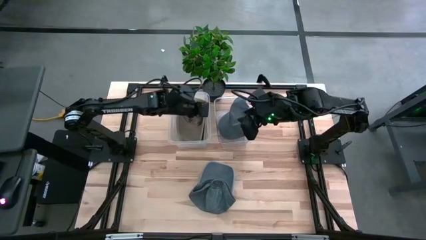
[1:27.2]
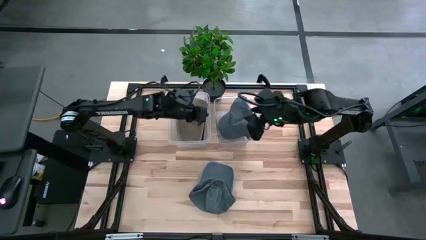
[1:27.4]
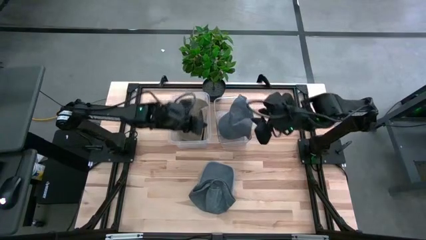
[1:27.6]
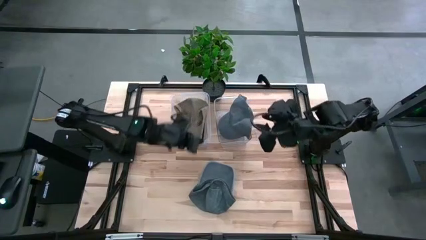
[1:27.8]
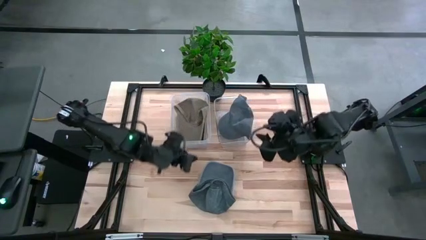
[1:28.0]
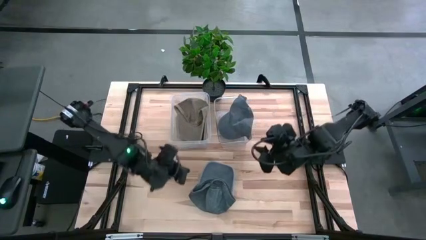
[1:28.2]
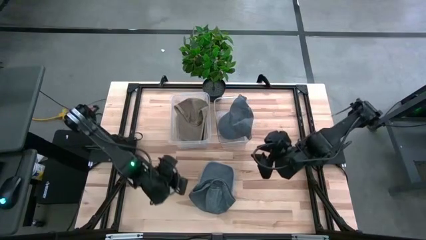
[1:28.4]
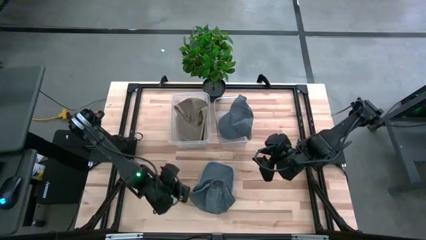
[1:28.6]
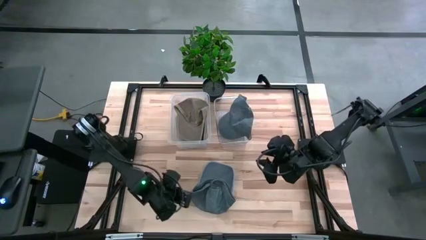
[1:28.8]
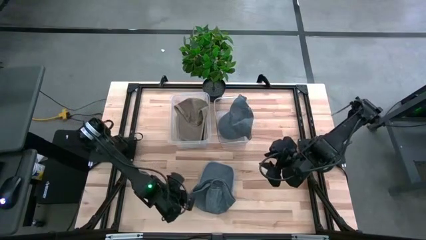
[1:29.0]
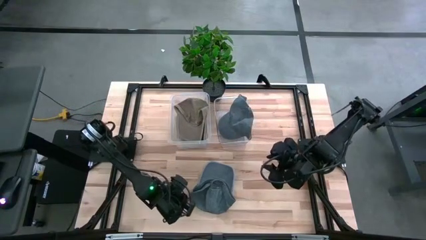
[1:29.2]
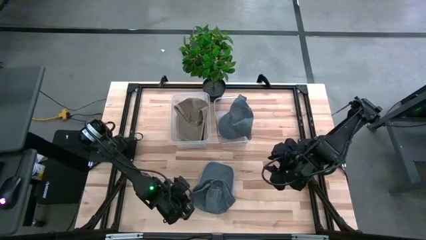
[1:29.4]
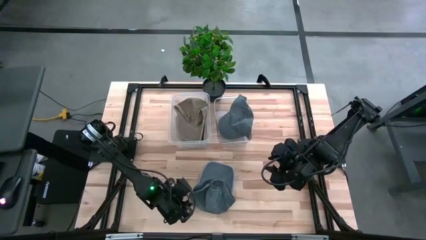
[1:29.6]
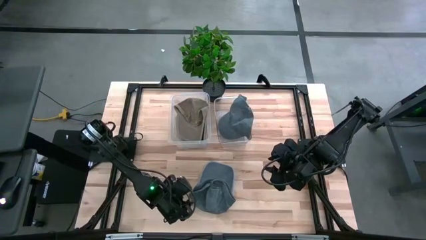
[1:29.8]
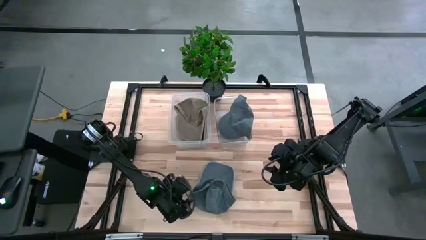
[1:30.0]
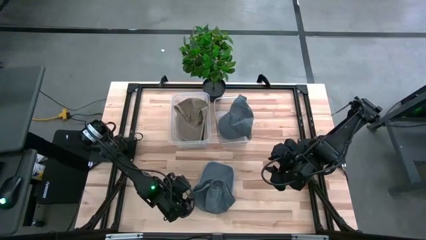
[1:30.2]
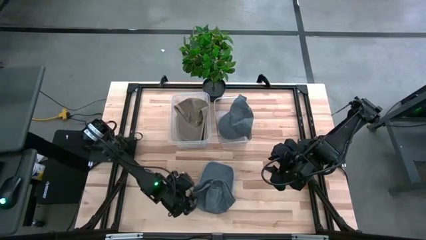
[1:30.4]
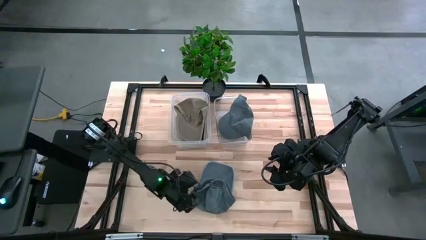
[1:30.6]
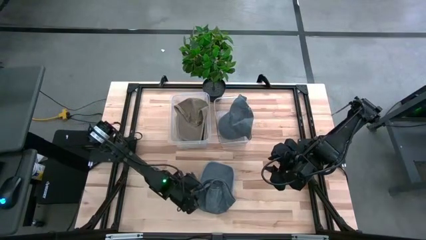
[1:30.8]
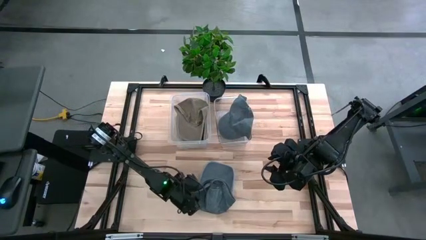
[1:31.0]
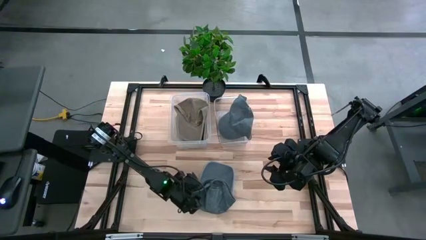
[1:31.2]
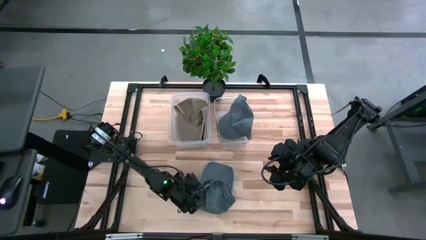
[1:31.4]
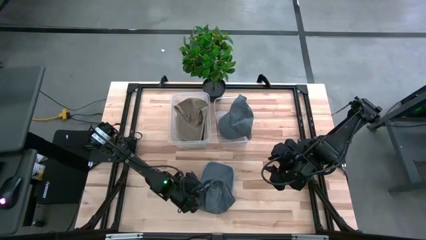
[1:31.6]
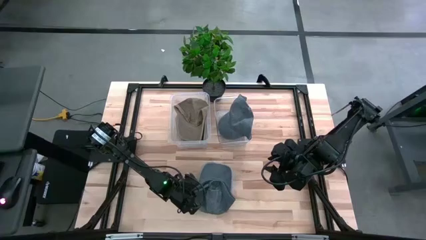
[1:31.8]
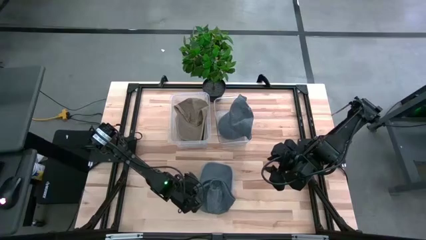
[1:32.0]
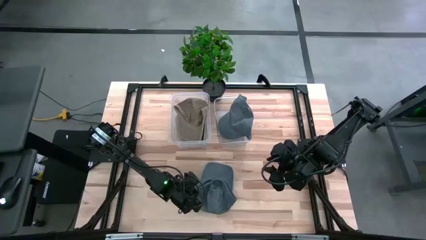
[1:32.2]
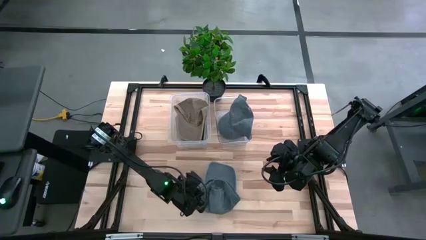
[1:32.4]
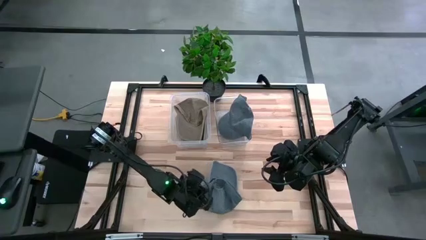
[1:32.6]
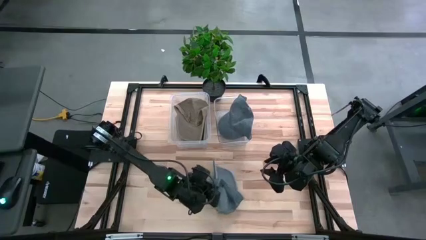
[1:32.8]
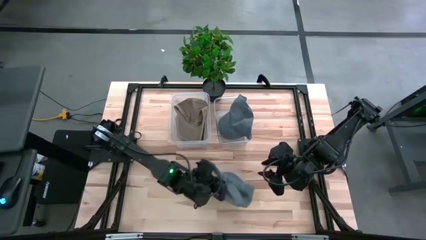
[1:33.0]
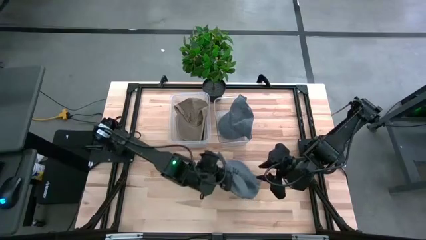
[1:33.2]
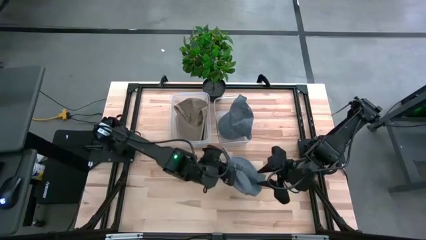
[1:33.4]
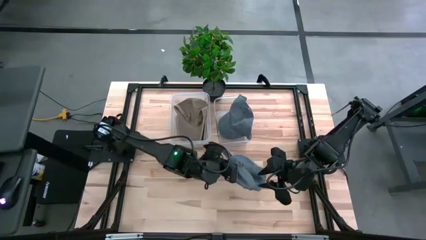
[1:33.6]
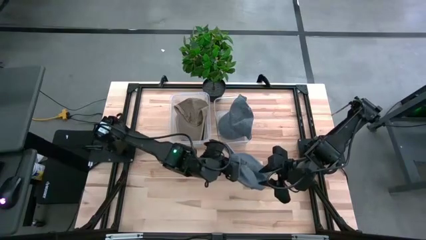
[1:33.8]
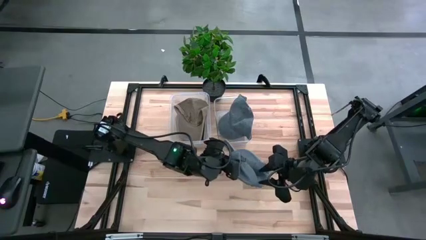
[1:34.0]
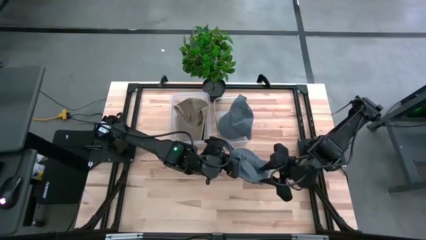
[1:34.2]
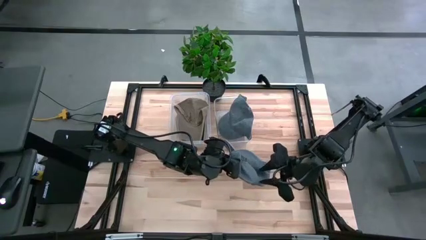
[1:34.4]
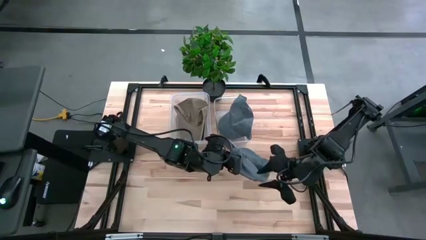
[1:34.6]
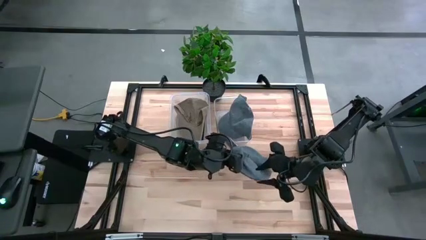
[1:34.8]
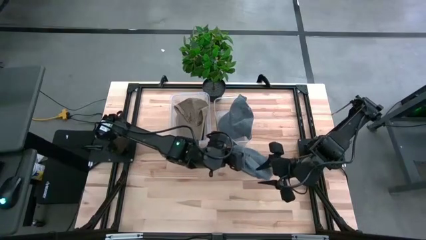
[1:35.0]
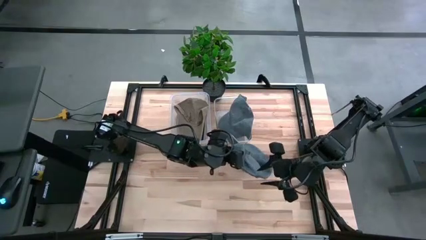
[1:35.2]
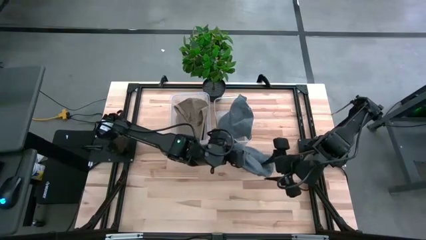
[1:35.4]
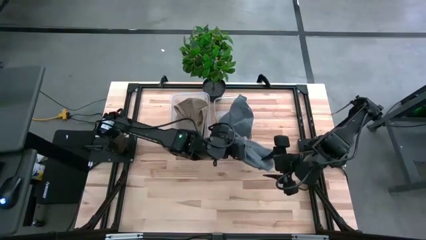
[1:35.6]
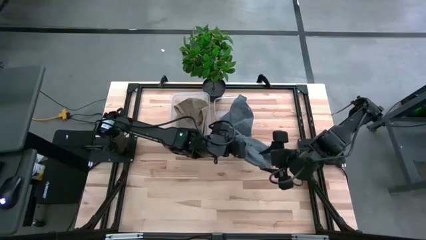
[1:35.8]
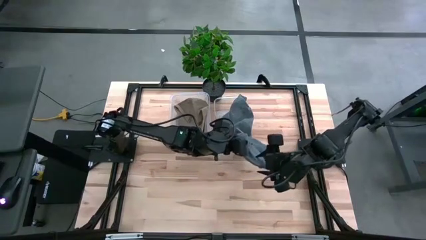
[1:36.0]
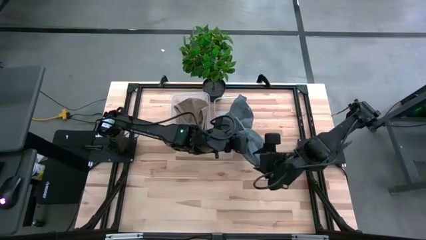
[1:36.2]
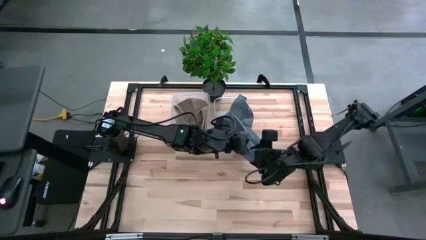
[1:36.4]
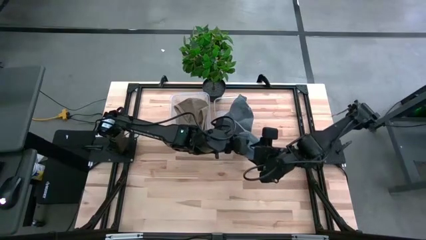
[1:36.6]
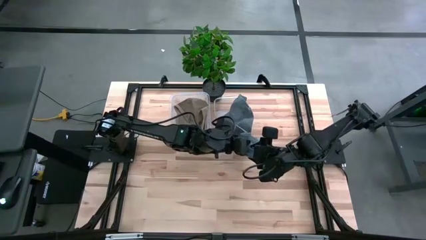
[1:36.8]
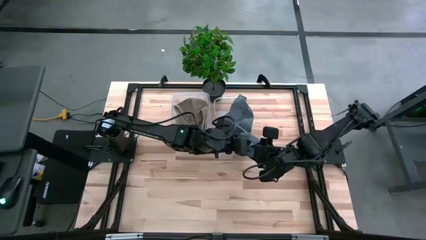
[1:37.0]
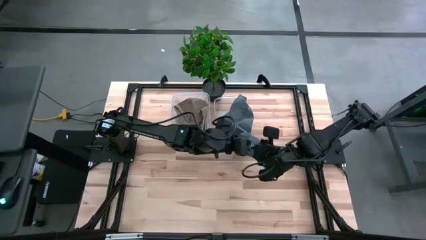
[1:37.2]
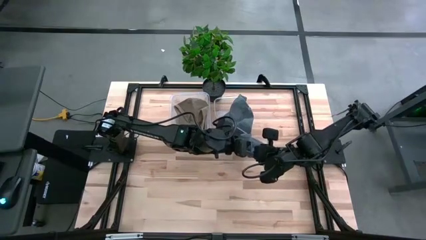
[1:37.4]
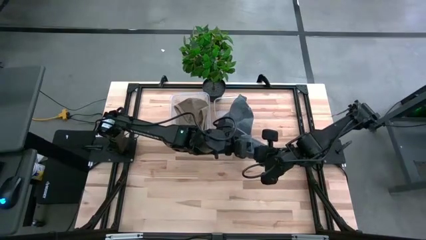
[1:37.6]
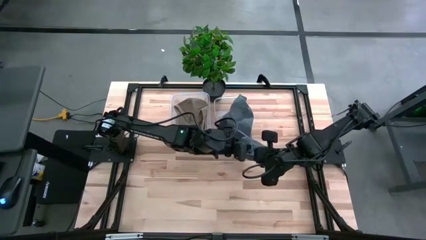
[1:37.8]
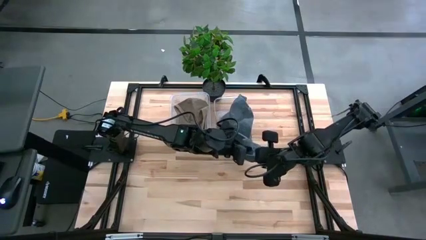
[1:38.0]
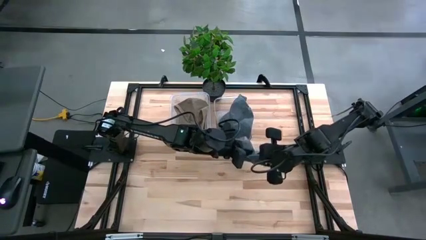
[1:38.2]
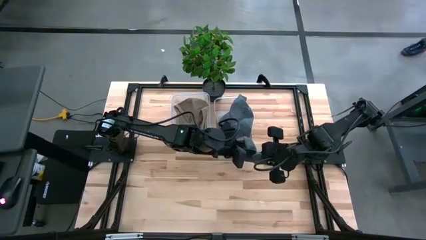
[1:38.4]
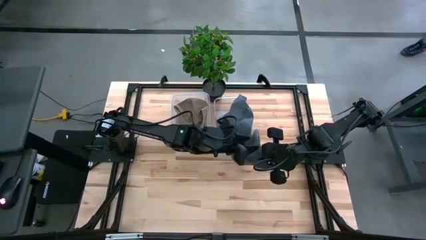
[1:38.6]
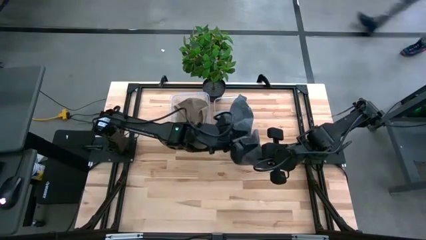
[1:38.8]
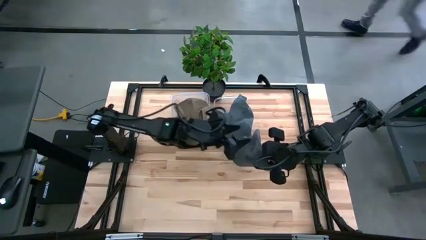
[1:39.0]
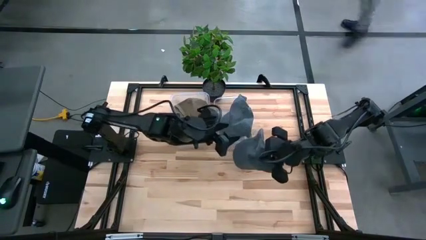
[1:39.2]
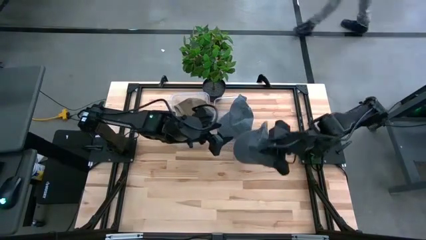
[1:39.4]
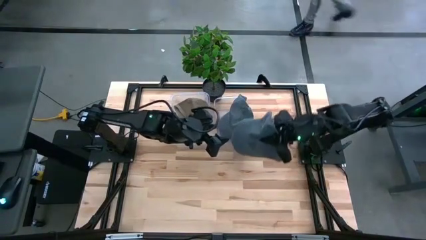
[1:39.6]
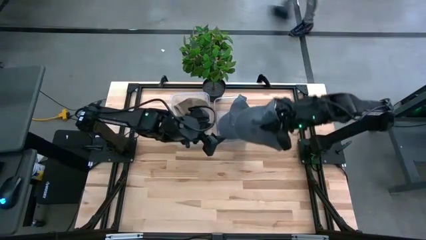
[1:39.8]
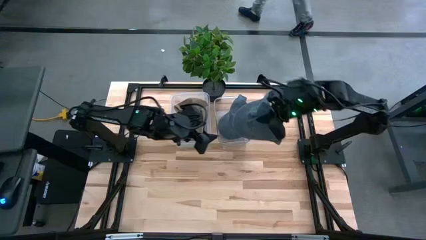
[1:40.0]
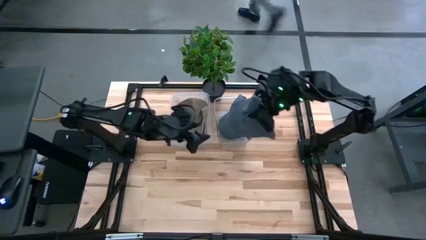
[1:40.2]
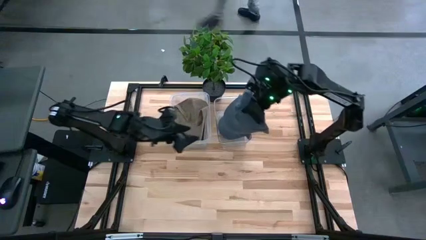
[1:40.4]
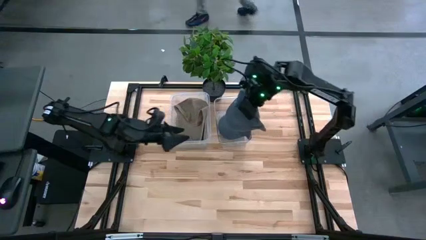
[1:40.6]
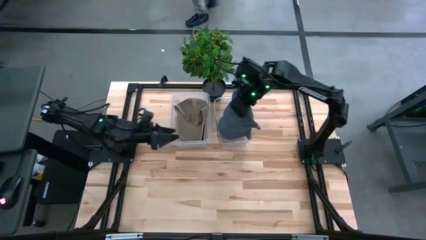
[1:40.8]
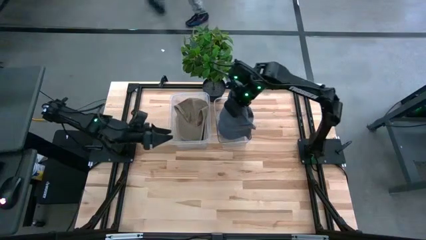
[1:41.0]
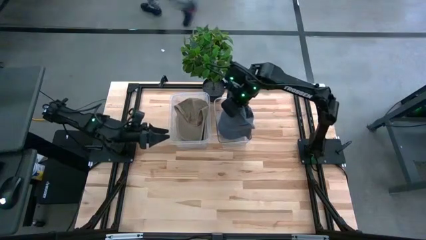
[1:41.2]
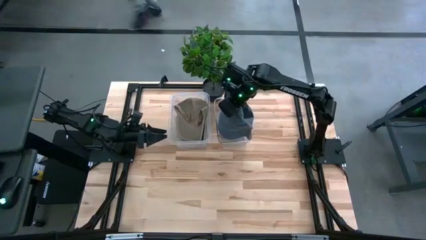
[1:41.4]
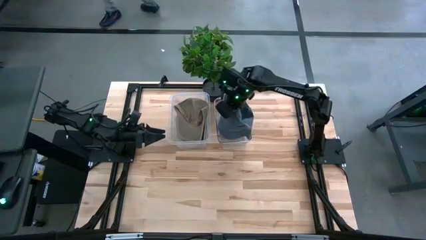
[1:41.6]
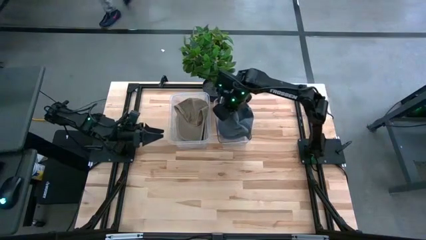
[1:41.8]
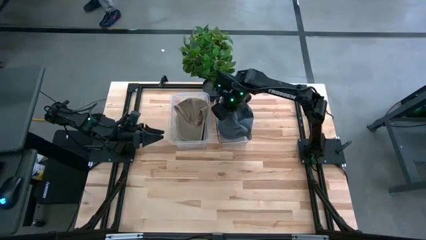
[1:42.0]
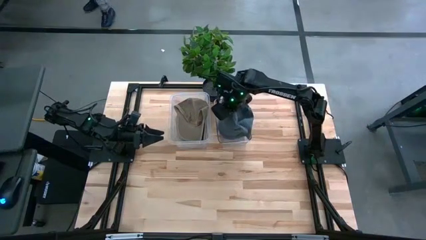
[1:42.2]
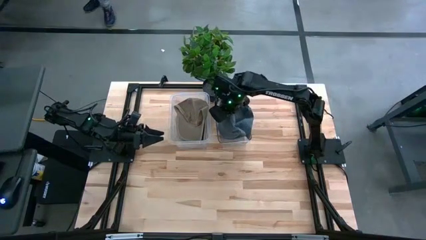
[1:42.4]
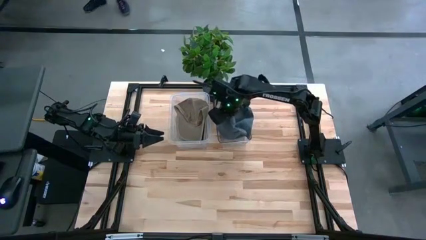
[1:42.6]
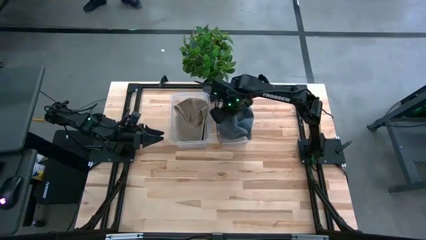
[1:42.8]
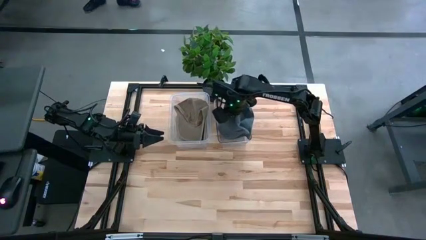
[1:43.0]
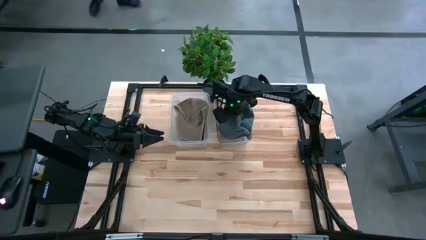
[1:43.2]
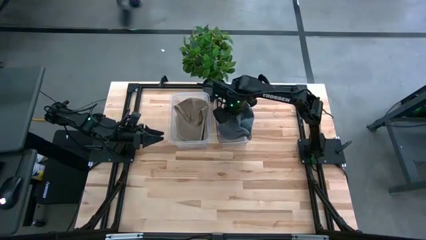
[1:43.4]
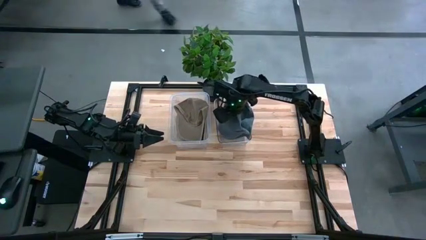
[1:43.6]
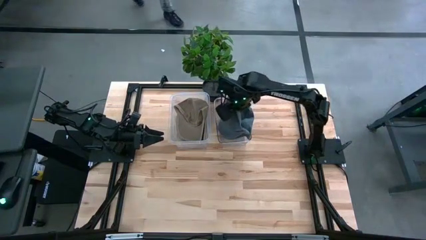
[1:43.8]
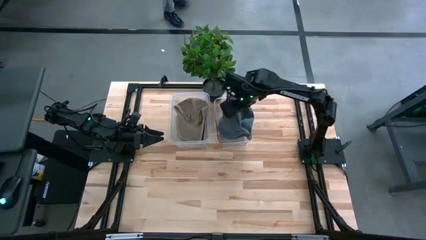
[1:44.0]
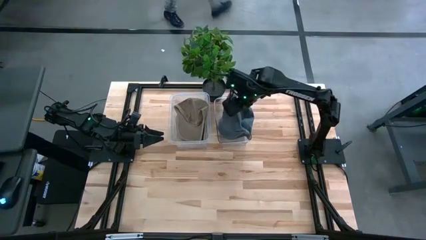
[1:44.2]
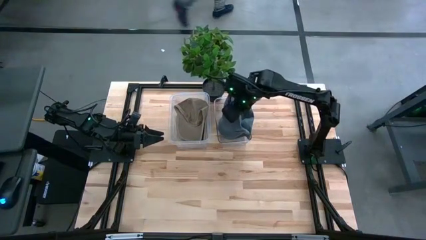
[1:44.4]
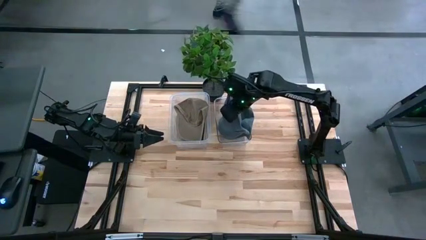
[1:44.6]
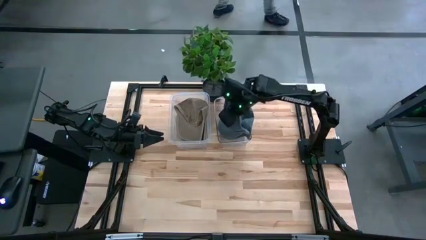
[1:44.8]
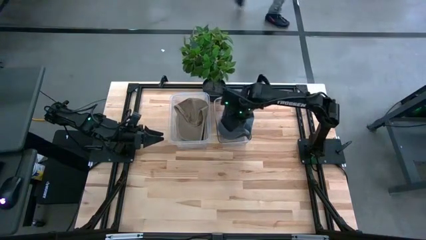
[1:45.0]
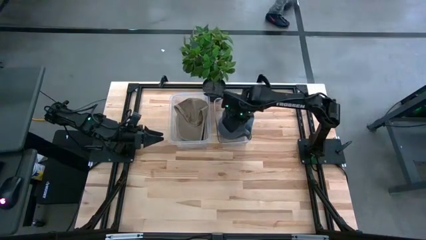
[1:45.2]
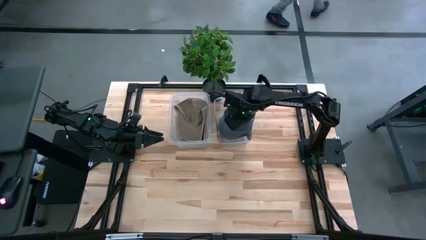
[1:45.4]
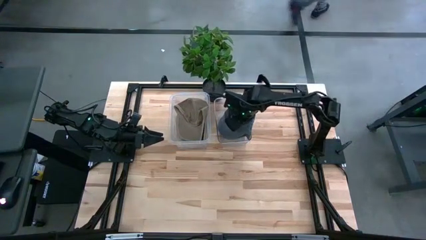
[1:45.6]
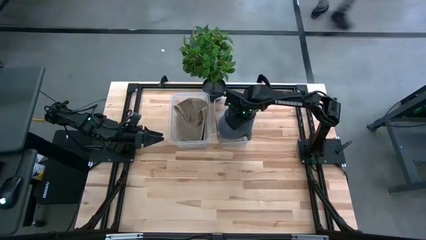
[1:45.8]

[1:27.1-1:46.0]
Task: Pick & Place hat
Put the gray cap into the right transparent bin
